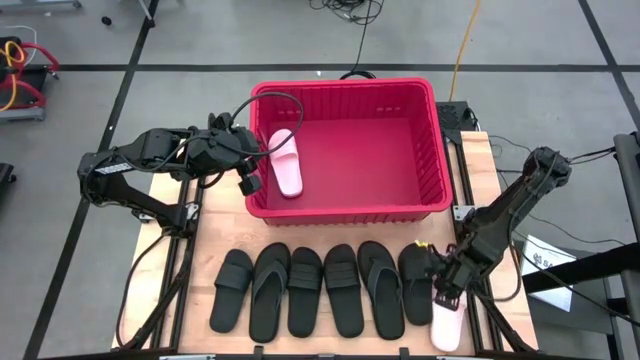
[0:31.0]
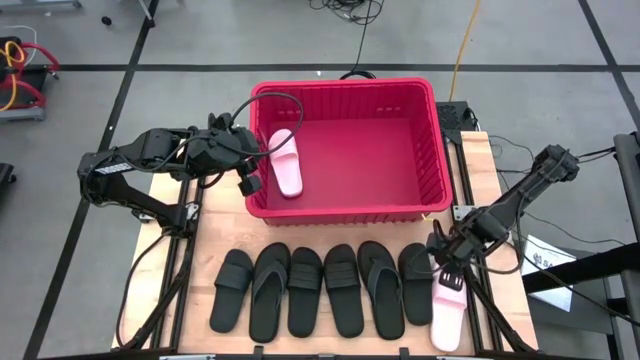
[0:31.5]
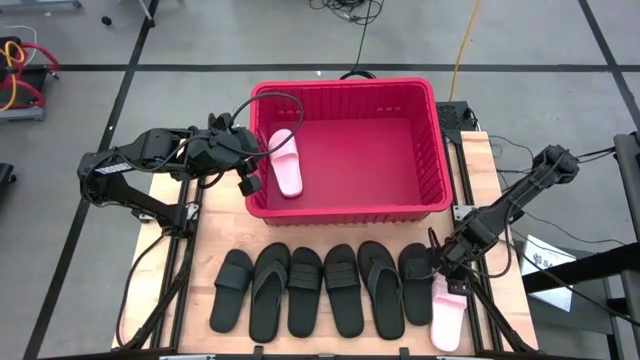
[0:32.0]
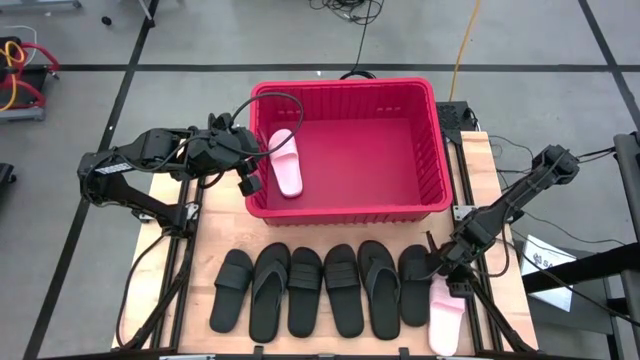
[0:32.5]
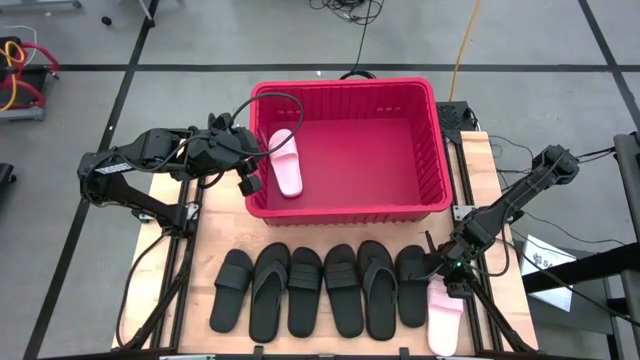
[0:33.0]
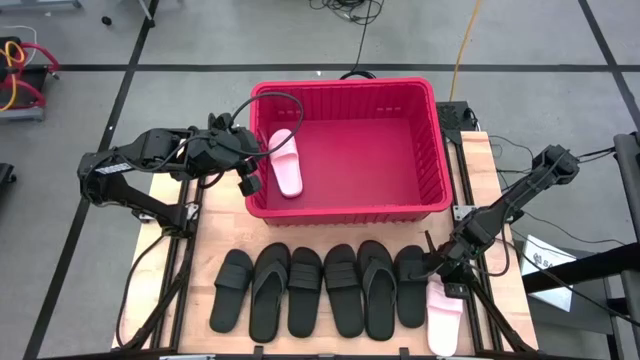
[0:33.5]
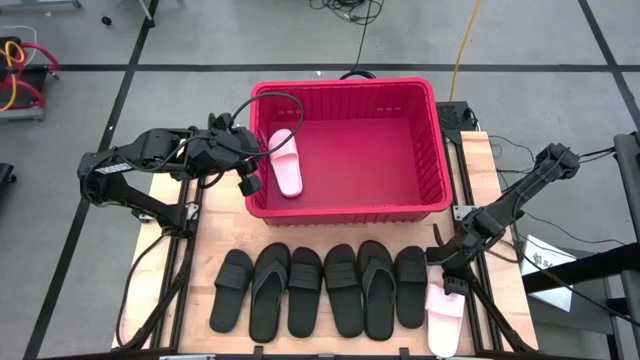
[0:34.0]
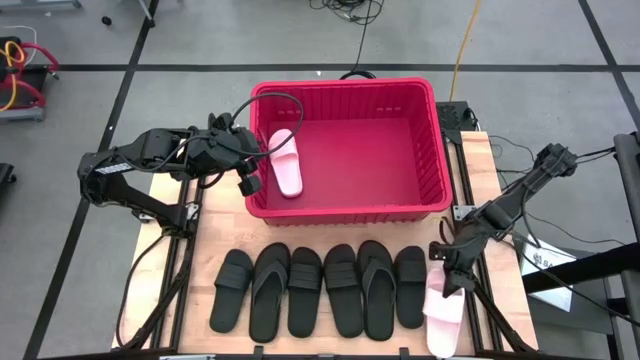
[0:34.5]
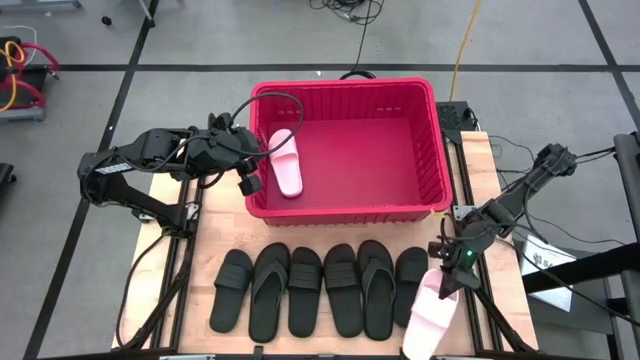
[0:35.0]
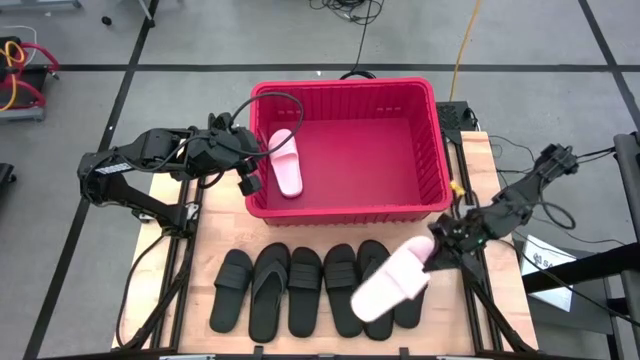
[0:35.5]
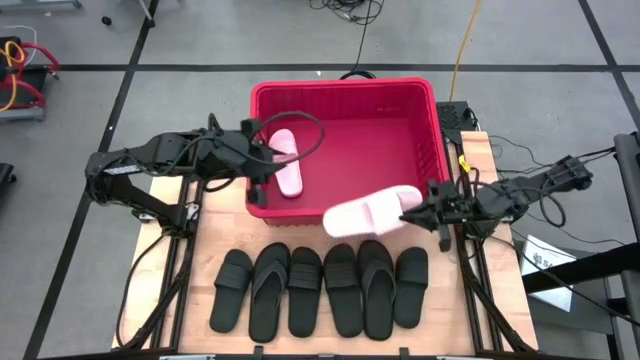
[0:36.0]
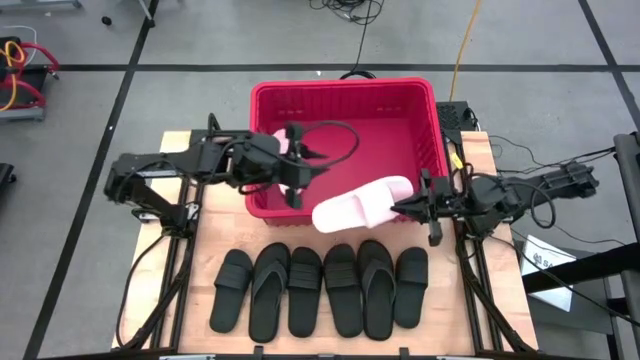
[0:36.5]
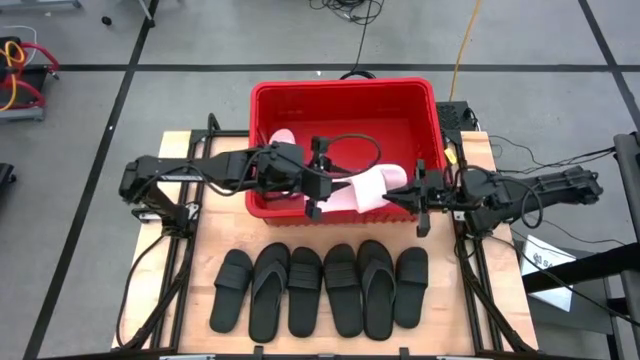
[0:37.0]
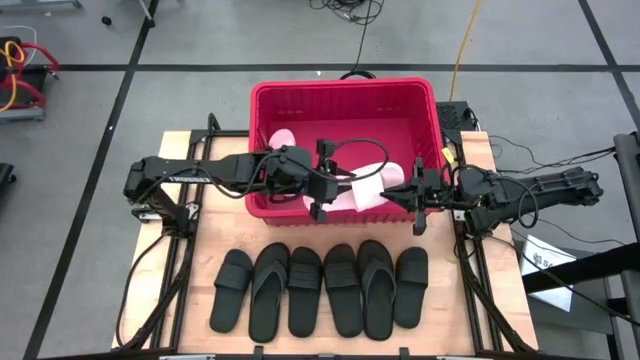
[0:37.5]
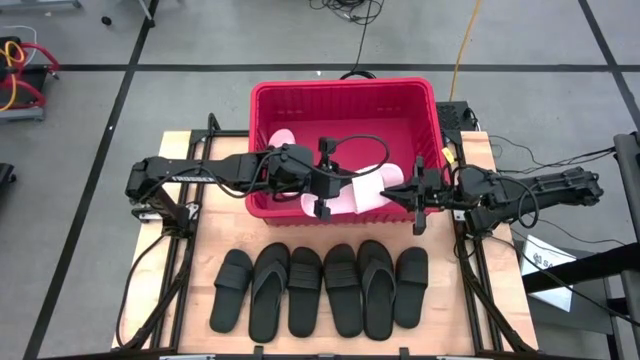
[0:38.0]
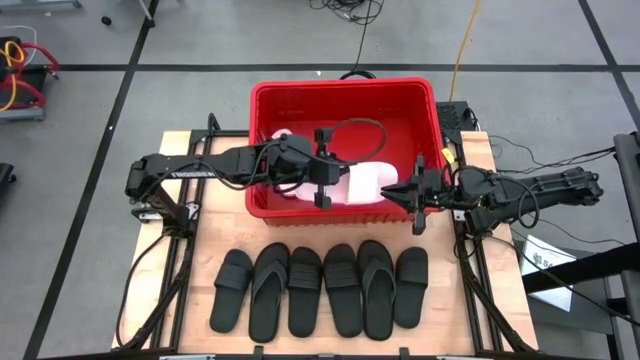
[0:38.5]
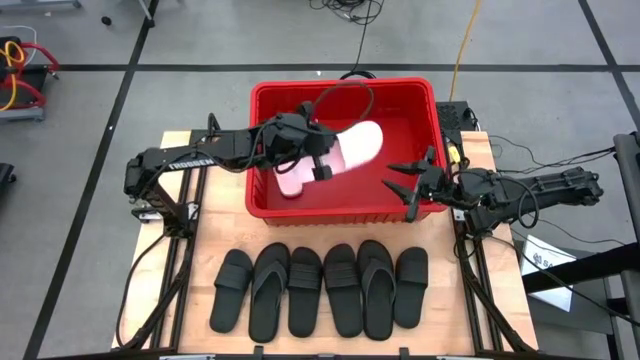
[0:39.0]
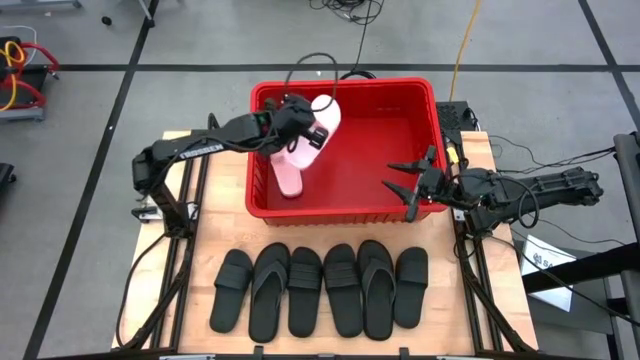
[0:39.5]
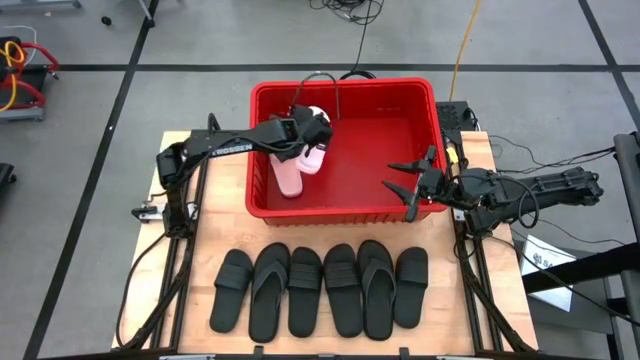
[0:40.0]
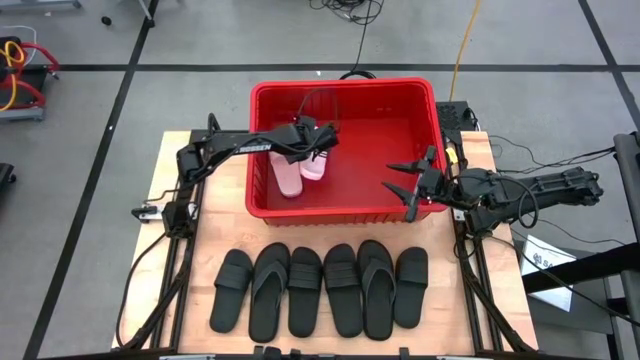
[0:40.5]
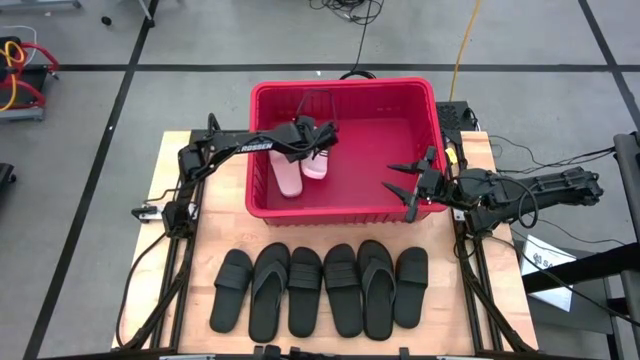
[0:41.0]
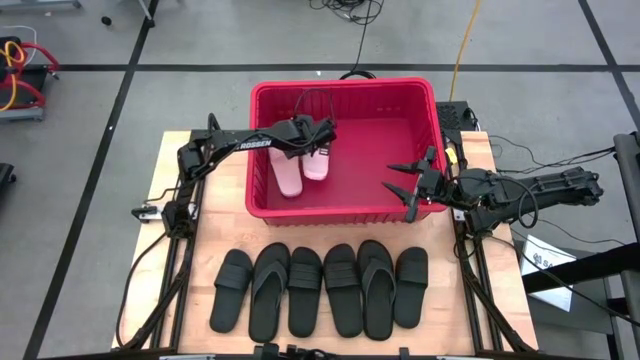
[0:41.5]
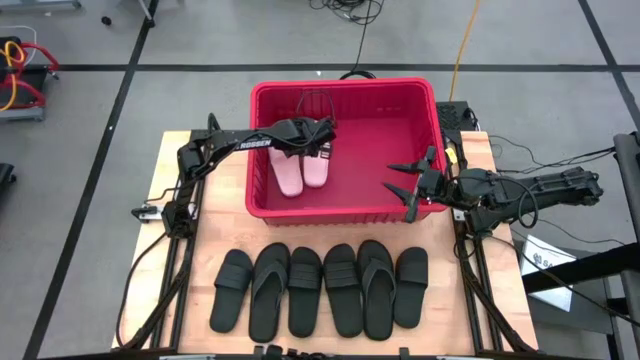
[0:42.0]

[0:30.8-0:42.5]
Task: Pick and place slides into bin
Put the pink slide into the red bin

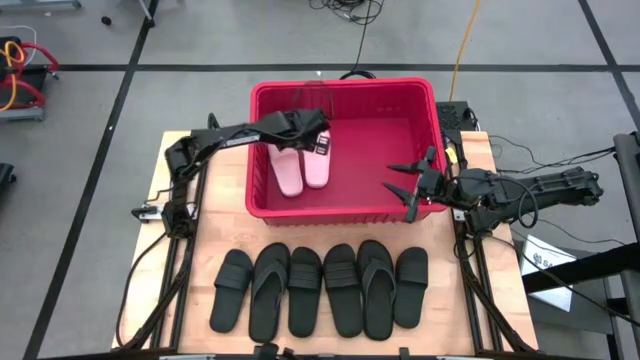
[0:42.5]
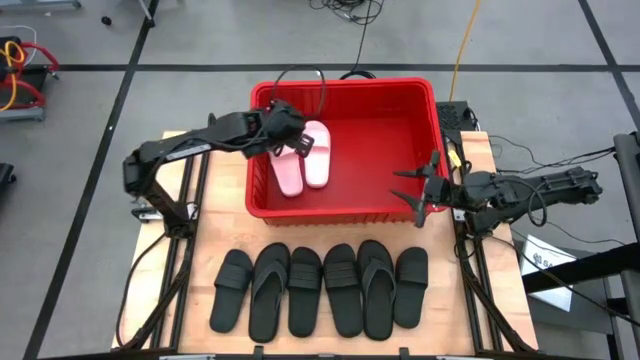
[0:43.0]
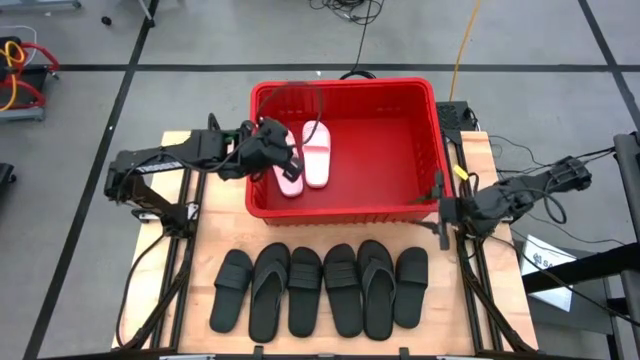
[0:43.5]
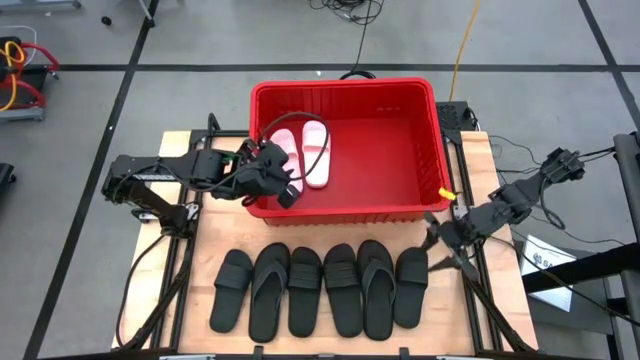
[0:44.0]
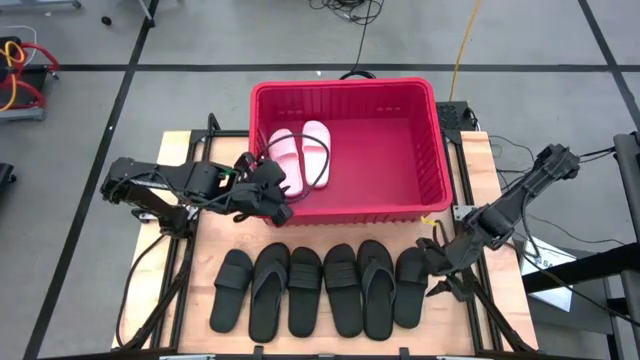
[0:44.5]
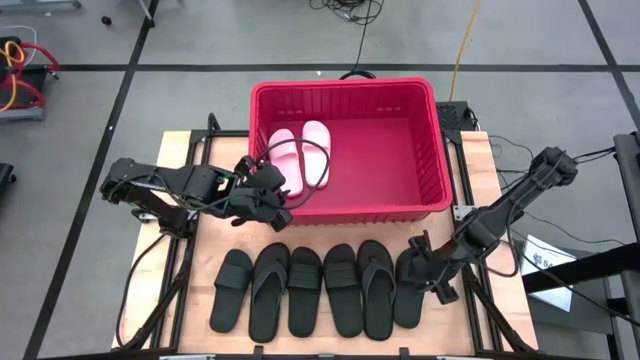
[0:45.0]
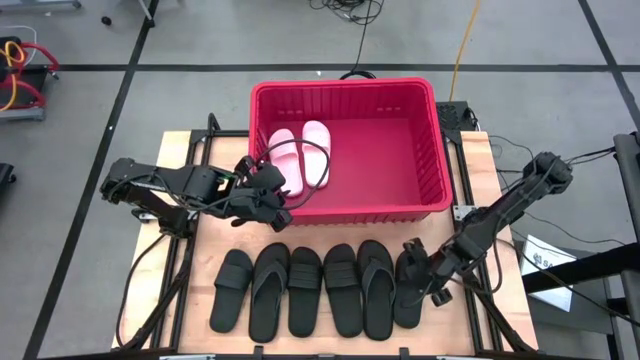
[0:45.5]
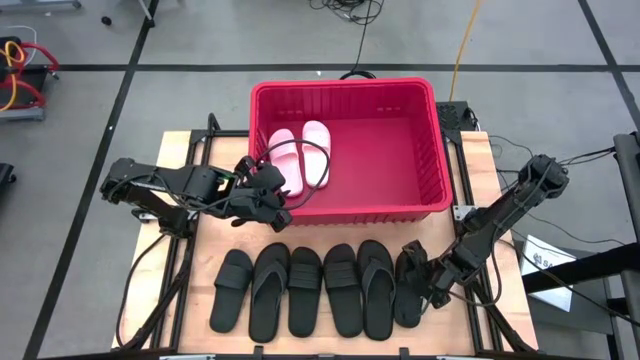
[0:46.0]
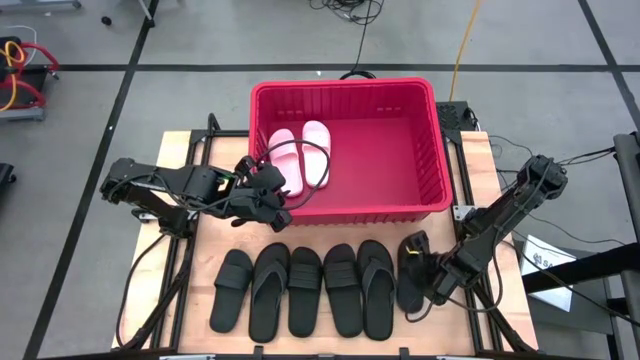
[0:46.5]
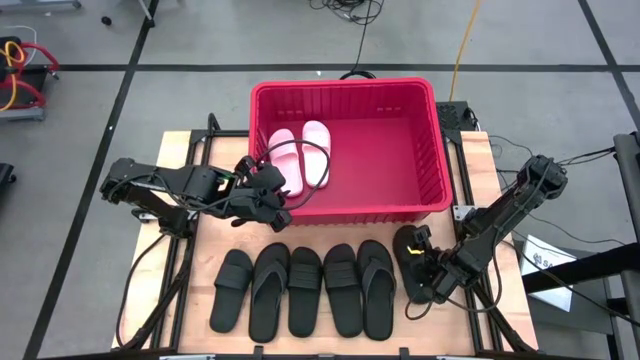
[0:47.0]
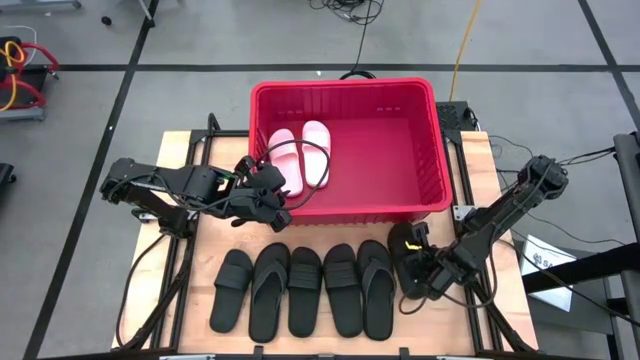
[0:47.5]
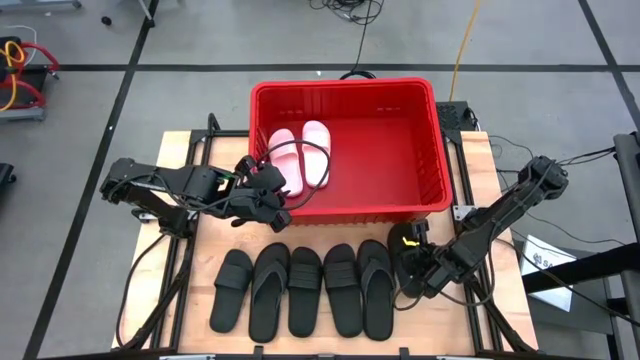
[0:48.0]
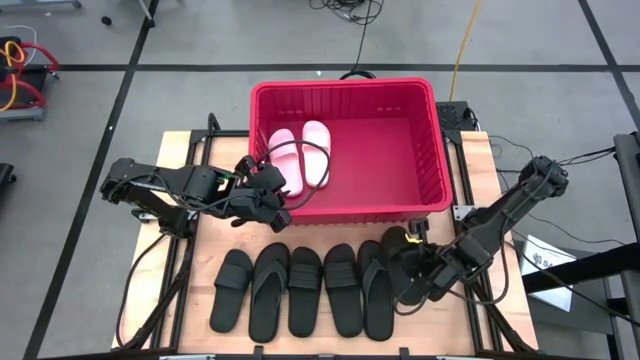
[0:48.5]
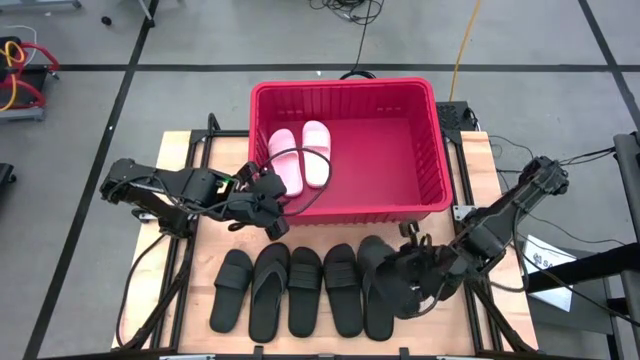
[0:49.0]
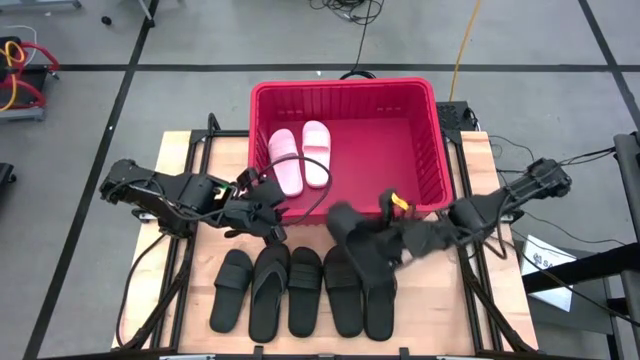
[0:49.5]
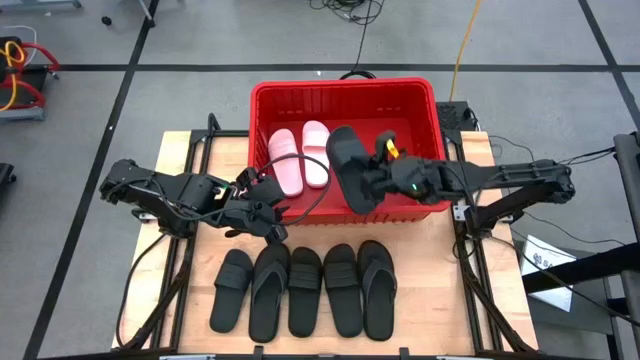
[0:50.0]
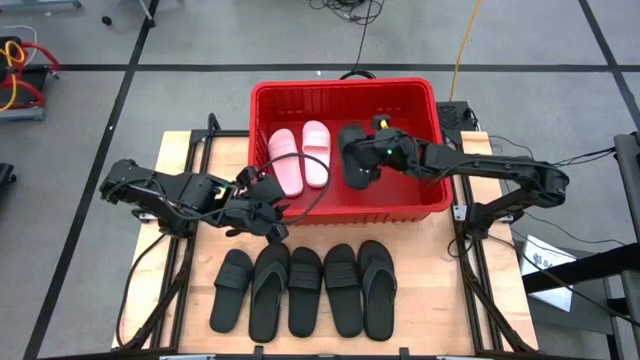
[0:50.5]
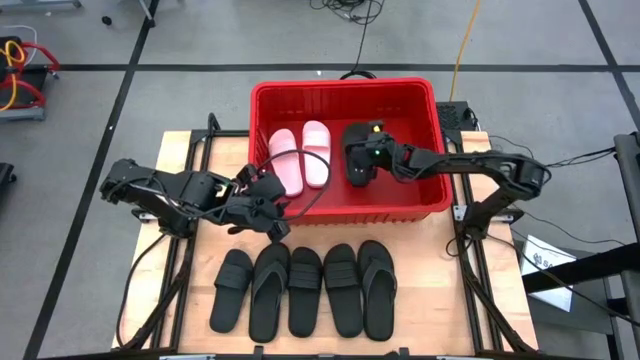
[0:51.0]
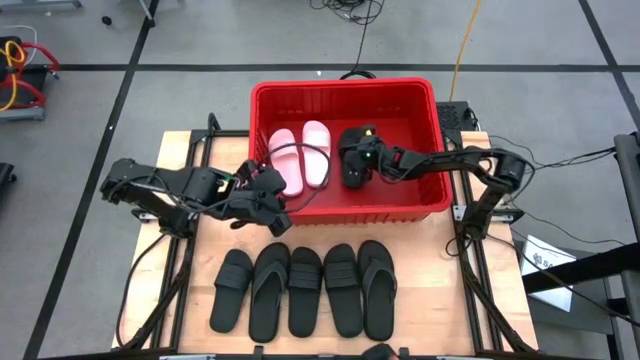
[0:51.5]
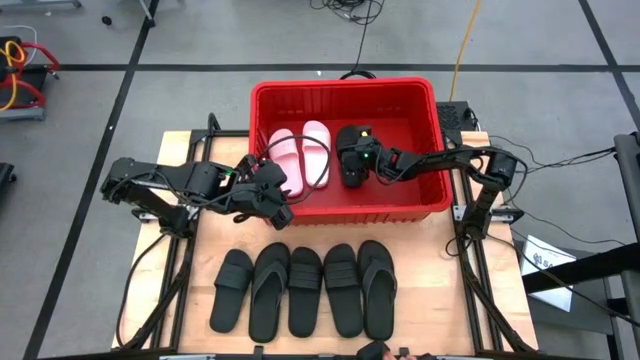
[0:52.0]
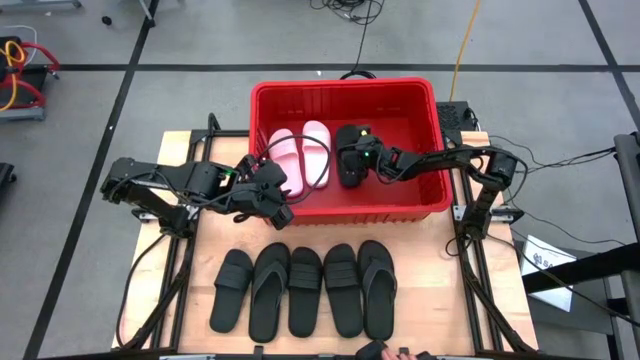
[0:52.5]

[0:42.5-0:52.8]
Put the black slide into the red bin
